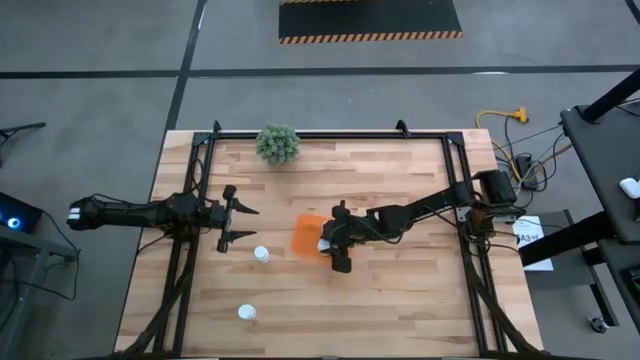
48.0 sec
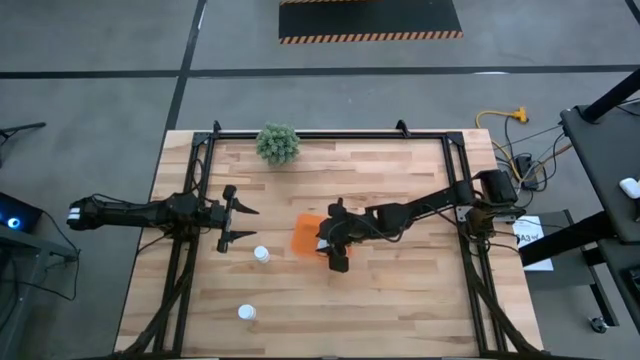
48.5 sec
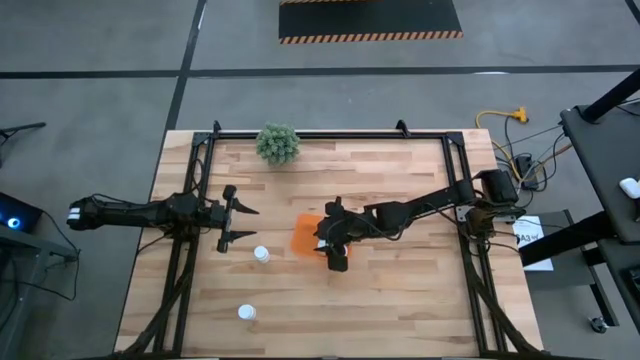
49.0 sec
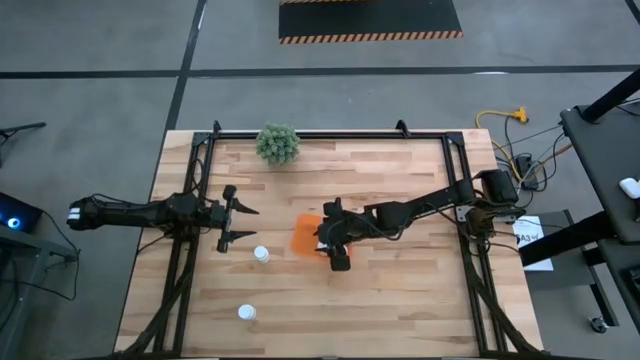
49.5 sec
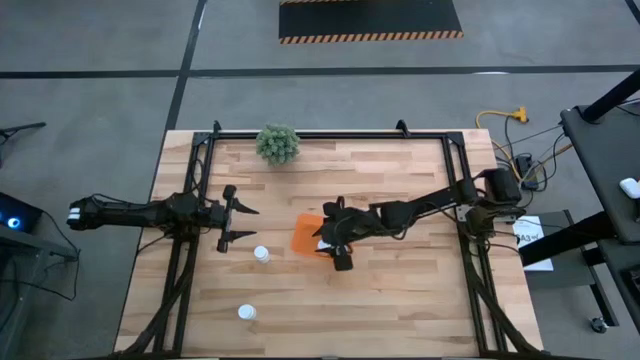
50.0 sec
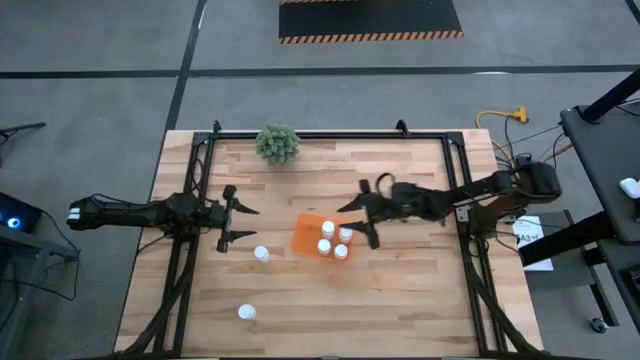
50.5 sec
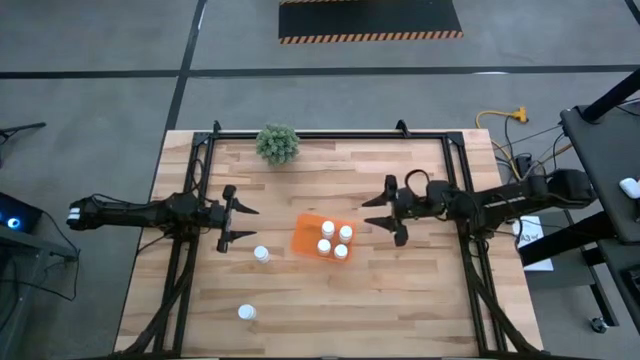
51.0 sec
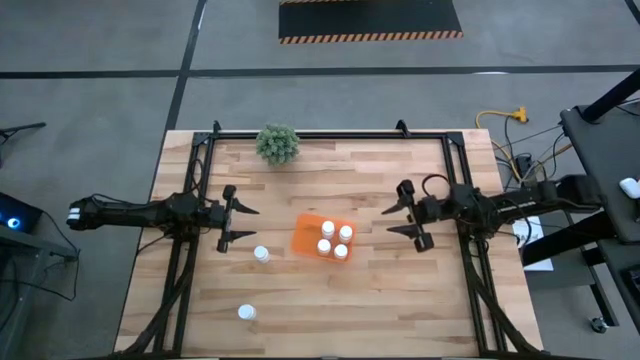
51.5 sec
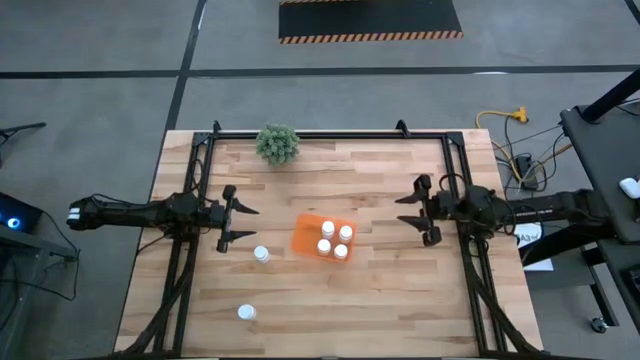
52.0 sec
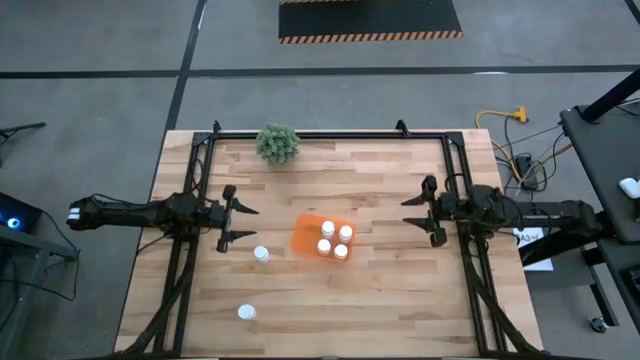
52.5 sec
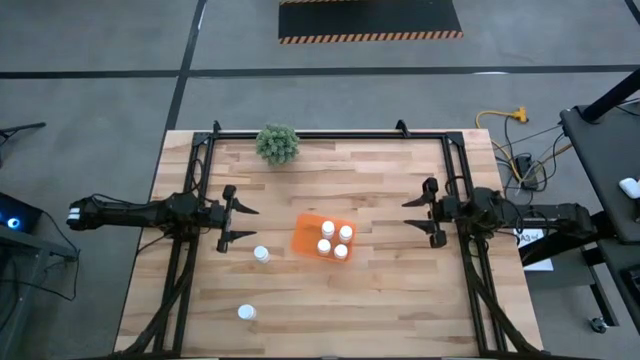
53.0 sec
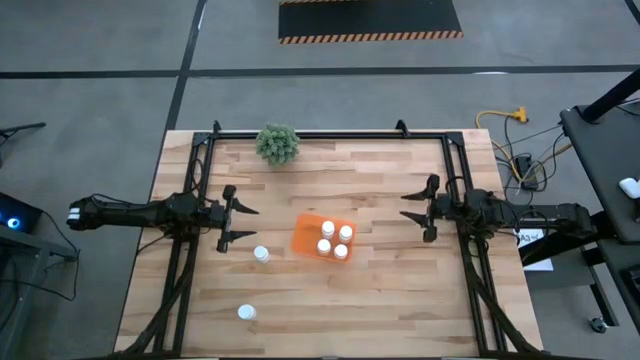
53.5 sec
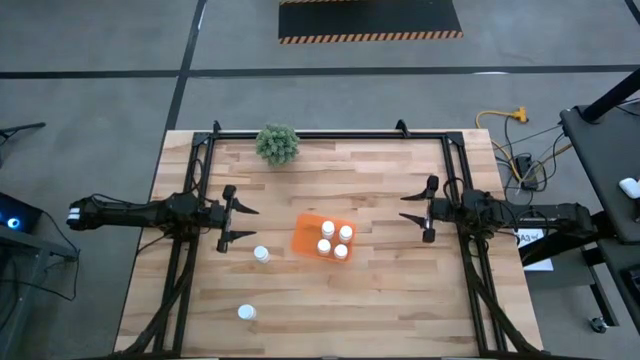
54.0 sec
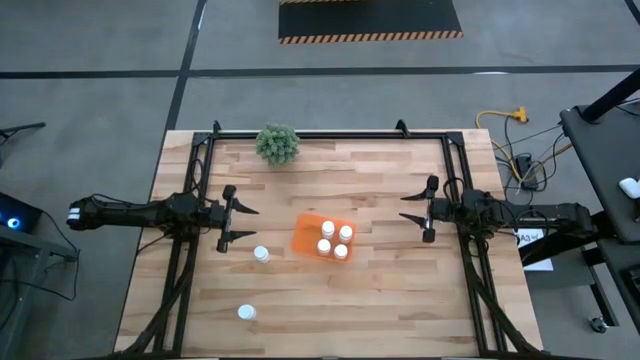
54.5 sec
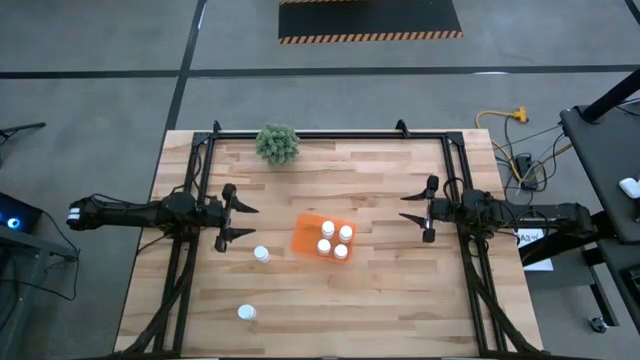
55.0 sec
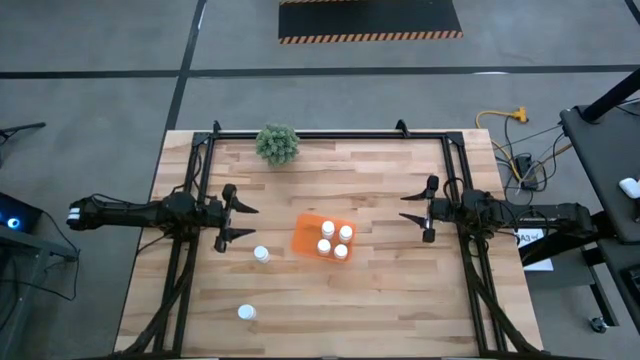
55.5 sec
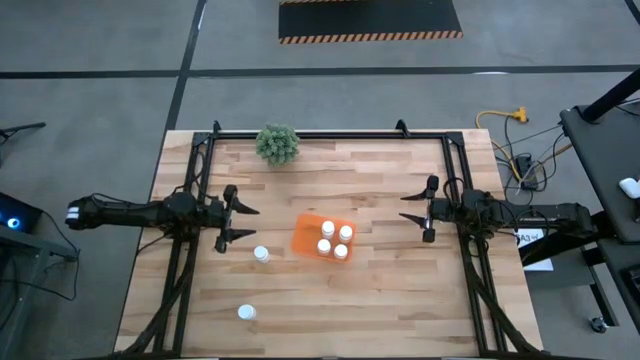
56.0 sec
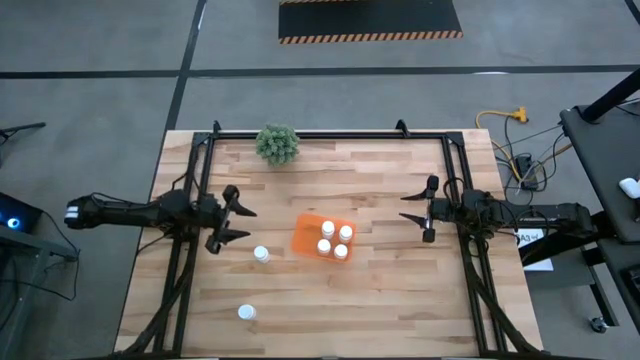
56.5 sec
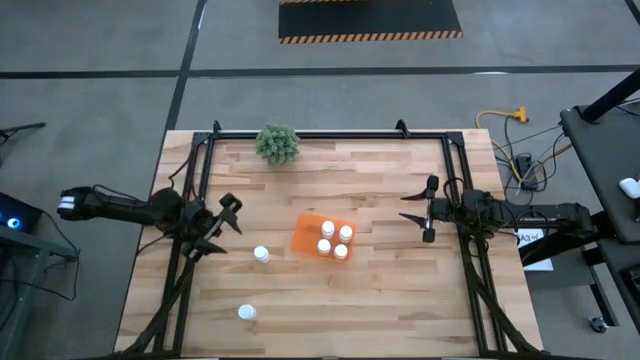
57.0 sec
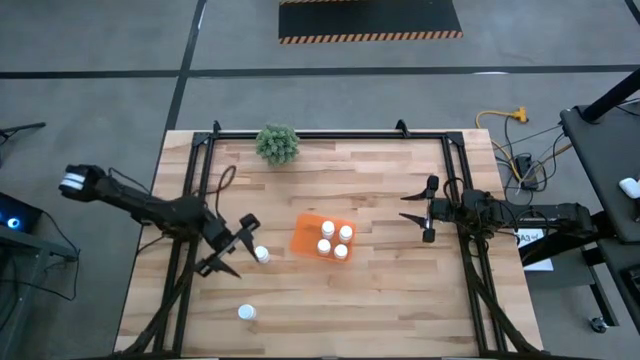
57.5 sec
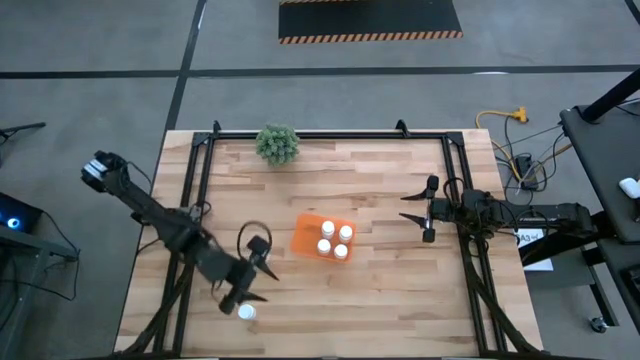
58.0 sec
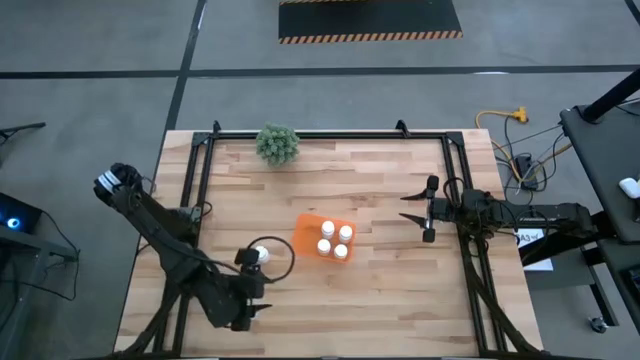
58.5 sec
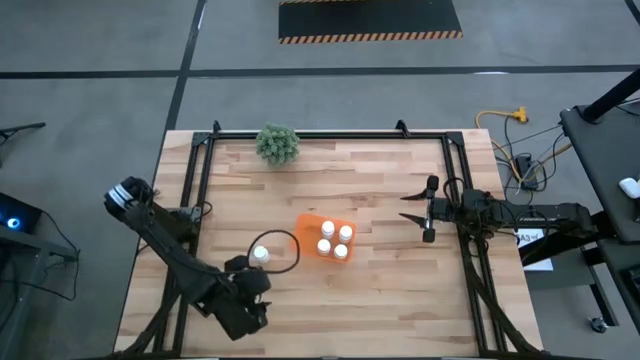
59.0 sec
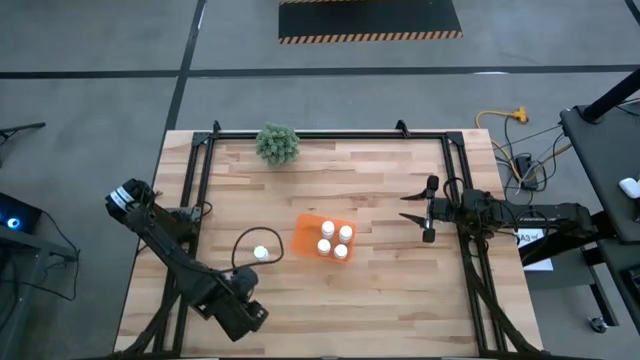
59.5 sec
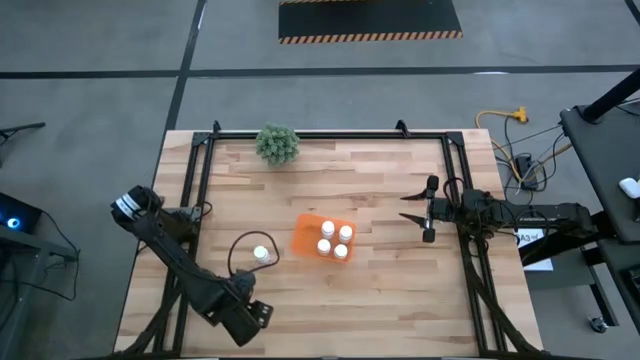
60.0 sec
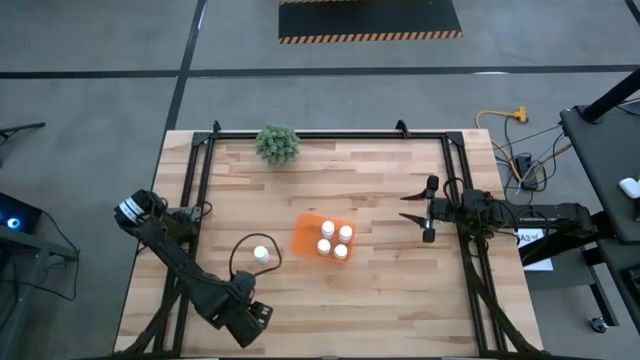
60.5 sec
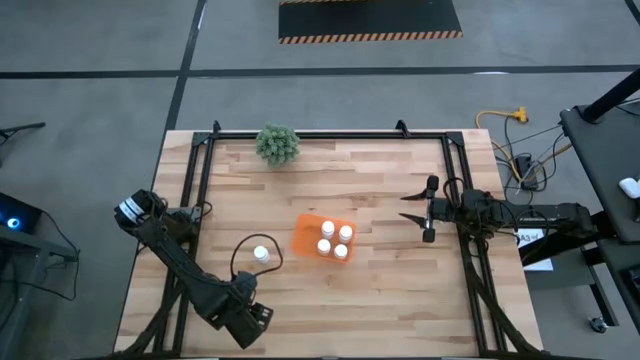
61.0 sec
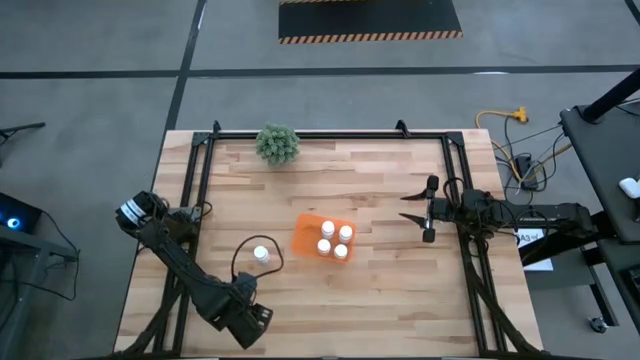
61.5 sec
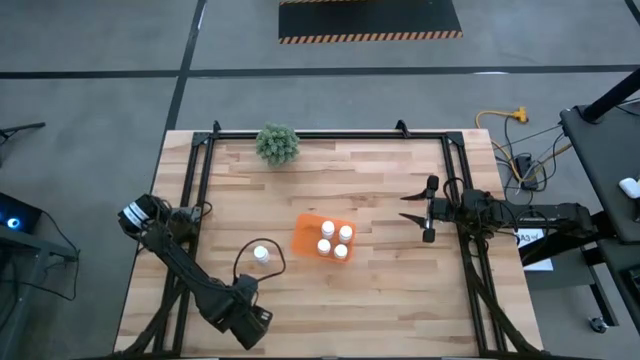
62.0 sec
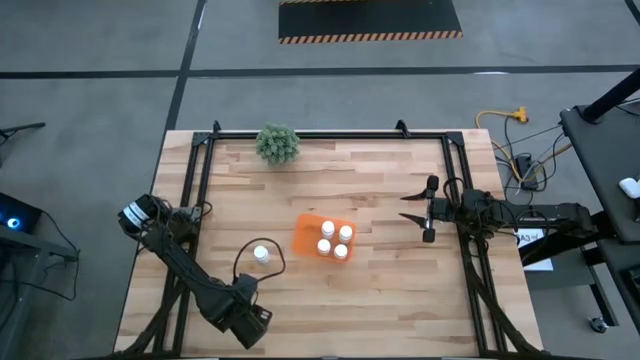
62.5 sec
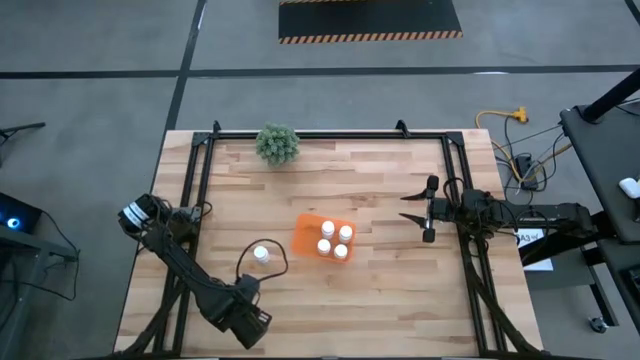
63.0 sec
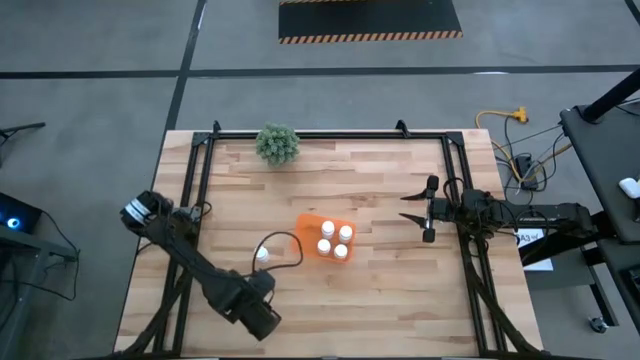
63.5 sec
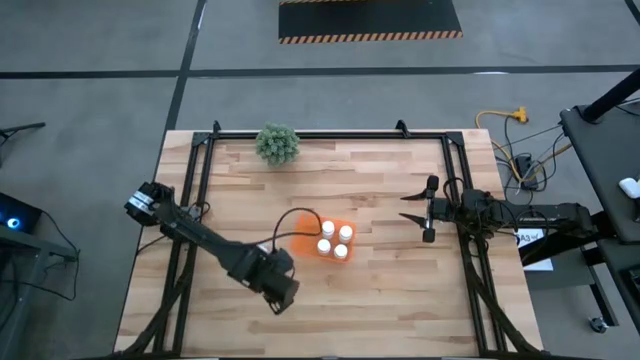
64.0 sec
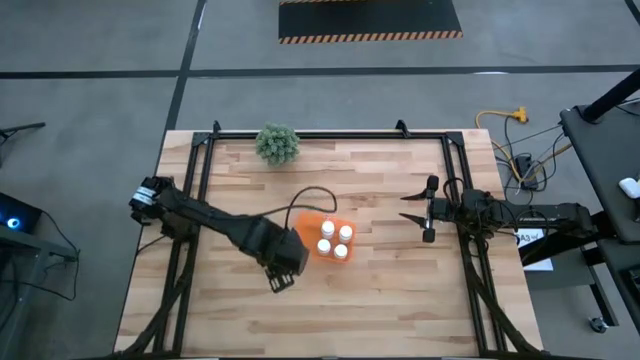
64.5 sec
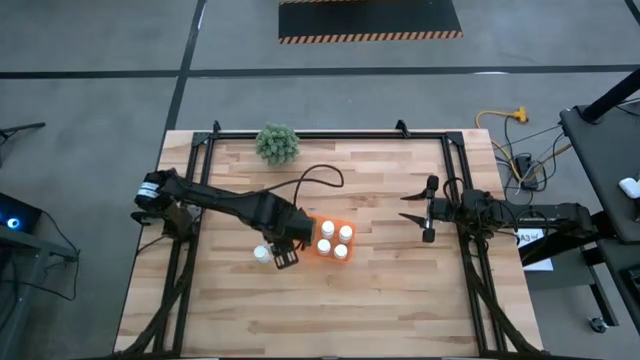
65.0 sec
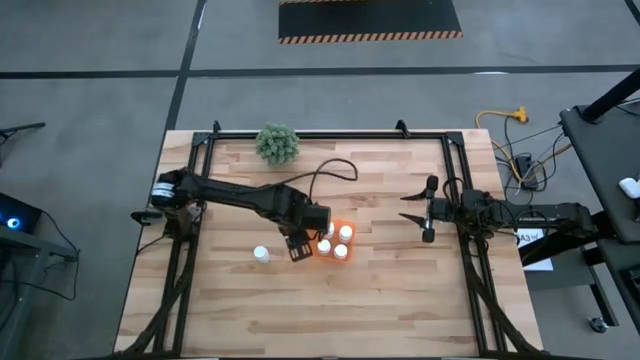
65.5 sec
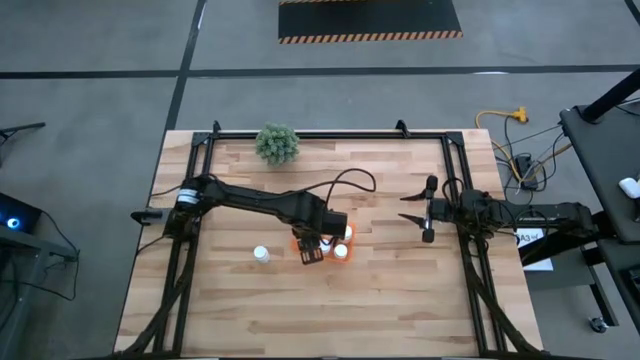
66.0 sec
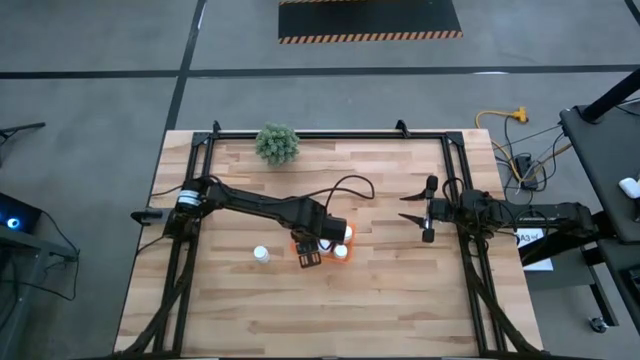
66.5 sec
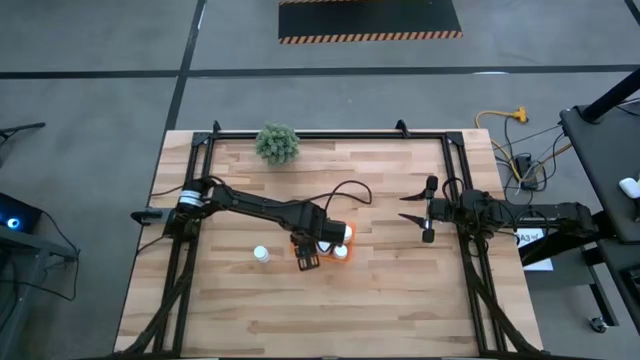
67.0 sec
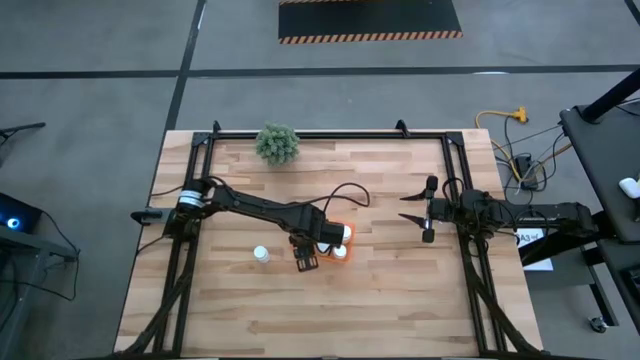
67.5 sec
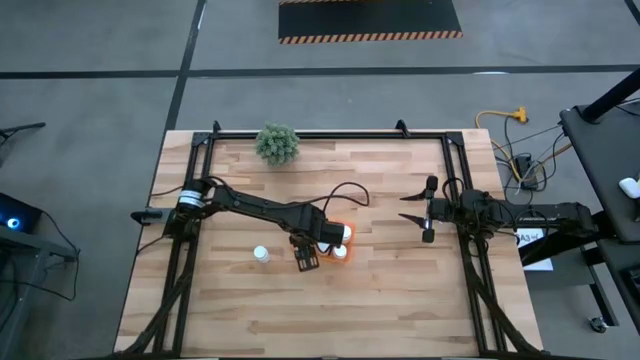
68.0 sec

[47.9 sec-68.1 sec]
Task: Pick and place pill bottles into a basket
Put the bottom pill bottle into the bin
